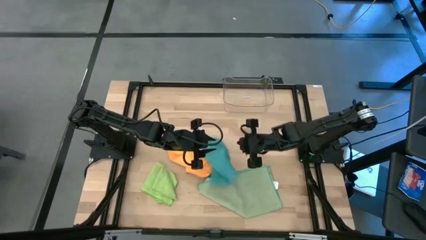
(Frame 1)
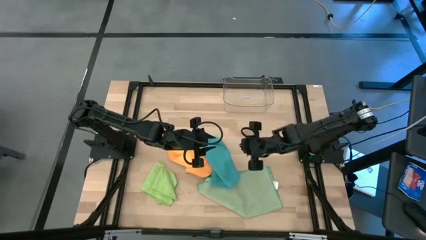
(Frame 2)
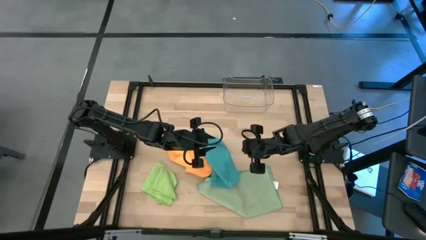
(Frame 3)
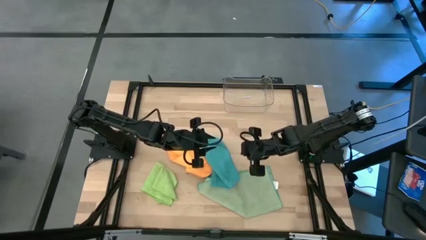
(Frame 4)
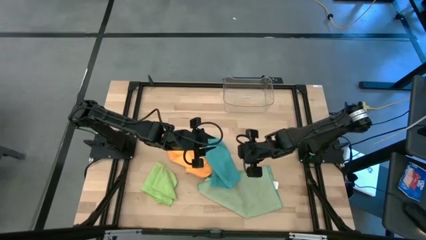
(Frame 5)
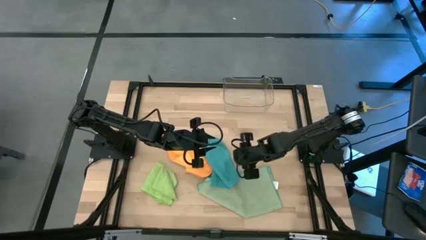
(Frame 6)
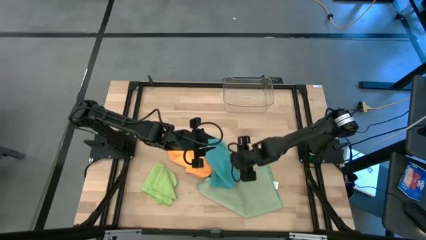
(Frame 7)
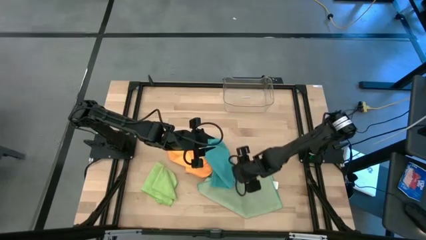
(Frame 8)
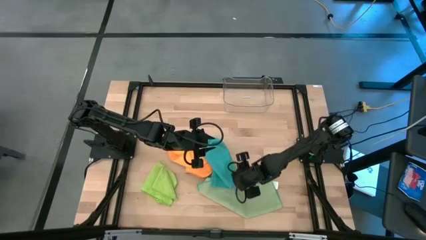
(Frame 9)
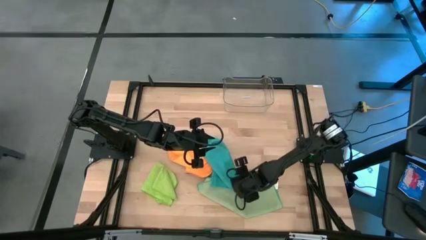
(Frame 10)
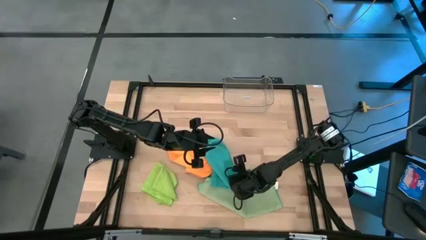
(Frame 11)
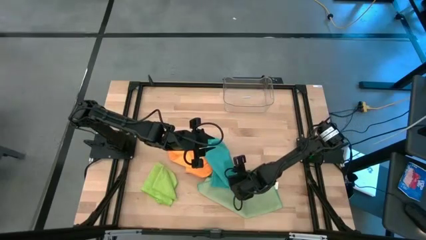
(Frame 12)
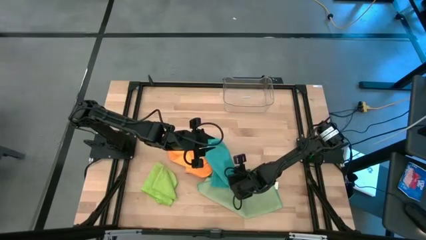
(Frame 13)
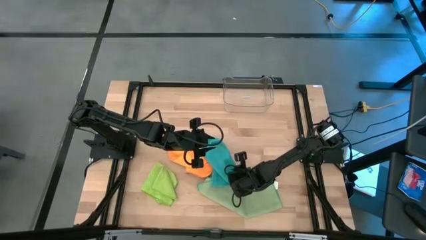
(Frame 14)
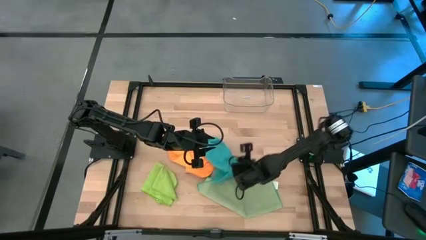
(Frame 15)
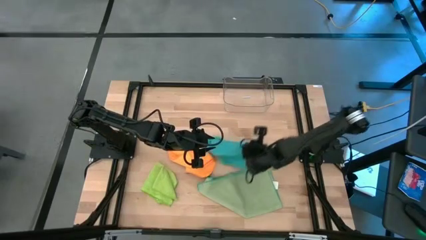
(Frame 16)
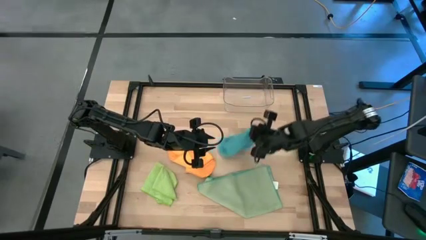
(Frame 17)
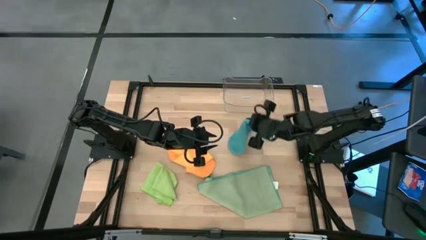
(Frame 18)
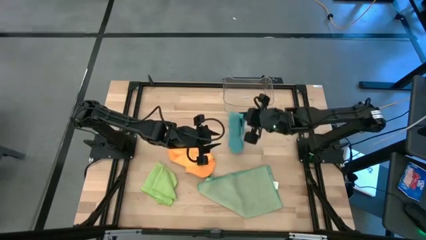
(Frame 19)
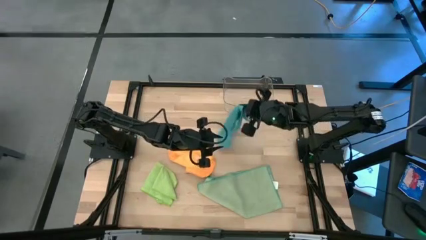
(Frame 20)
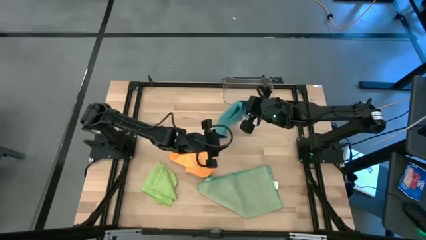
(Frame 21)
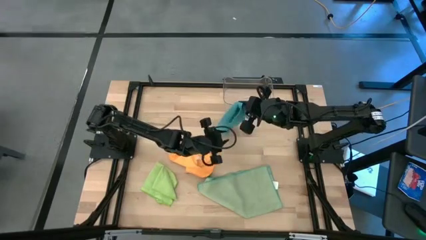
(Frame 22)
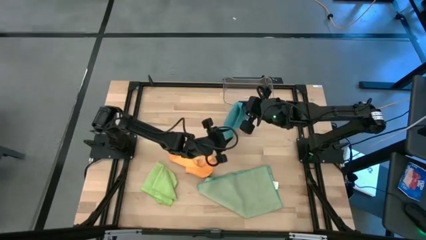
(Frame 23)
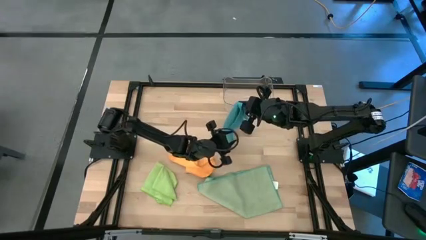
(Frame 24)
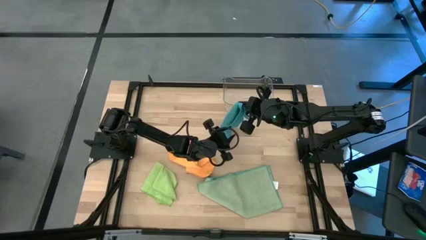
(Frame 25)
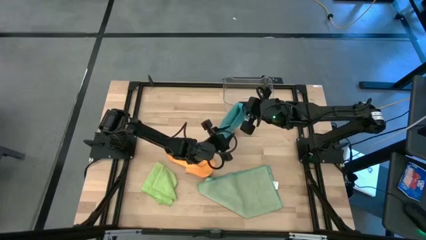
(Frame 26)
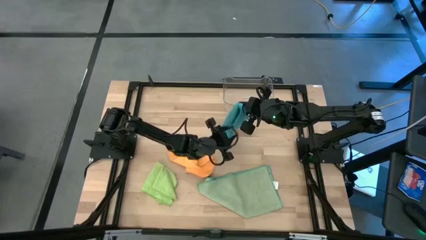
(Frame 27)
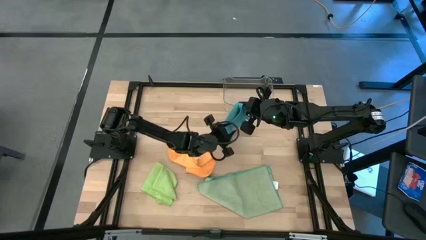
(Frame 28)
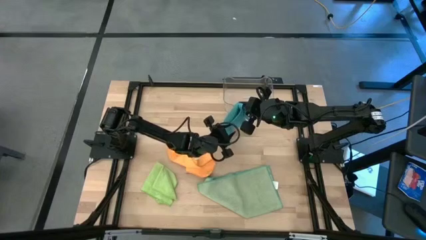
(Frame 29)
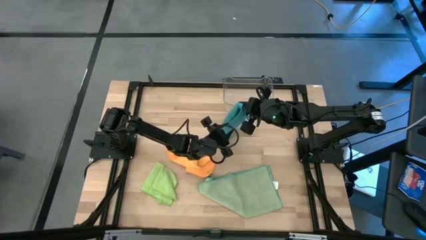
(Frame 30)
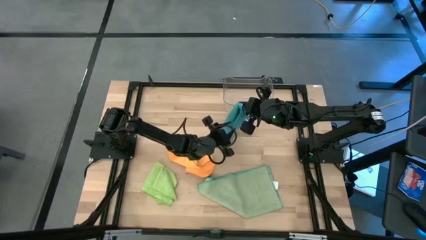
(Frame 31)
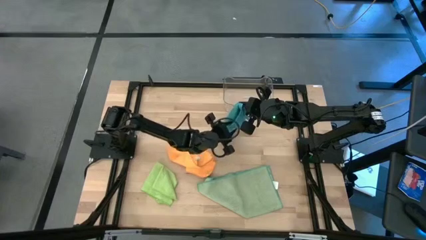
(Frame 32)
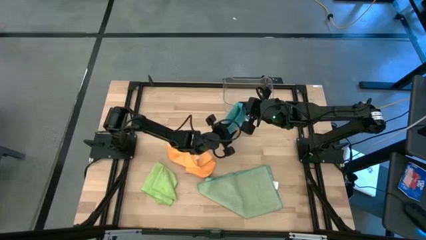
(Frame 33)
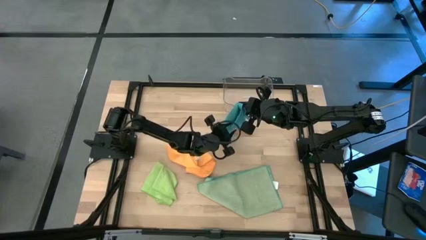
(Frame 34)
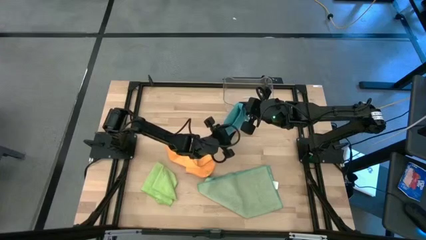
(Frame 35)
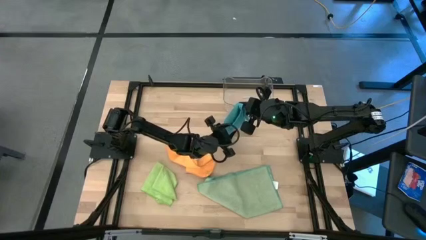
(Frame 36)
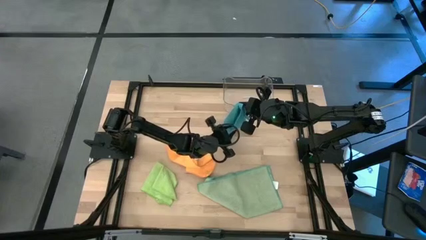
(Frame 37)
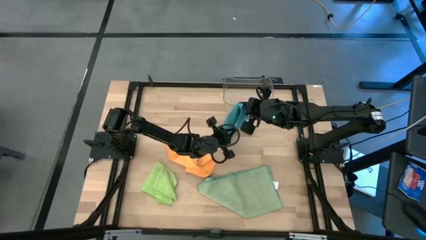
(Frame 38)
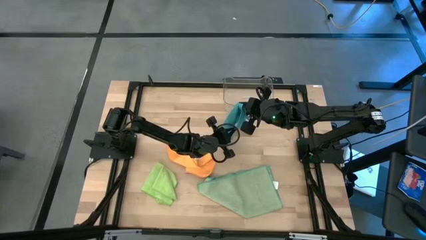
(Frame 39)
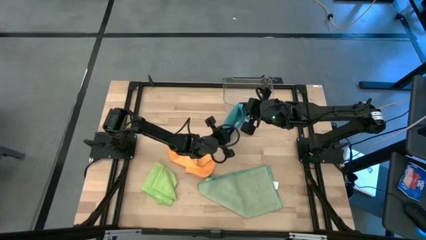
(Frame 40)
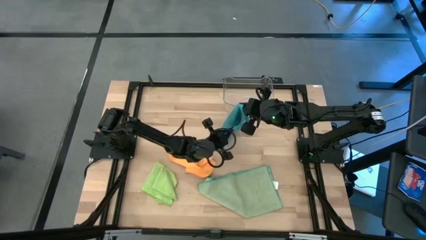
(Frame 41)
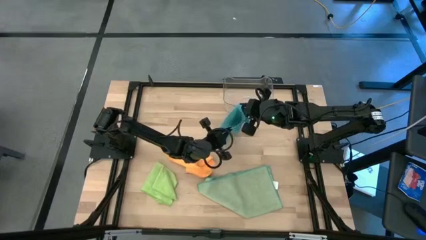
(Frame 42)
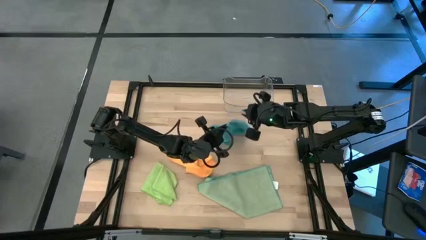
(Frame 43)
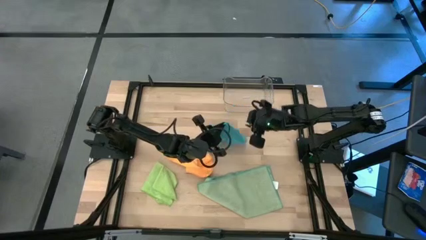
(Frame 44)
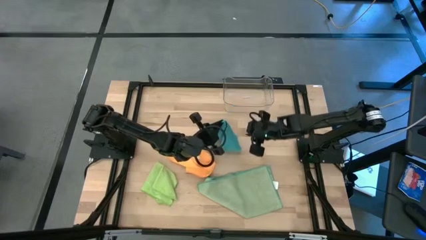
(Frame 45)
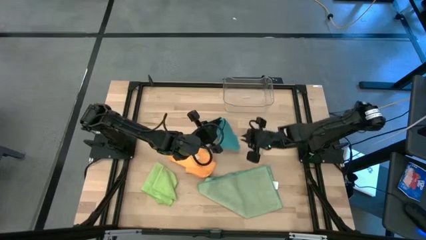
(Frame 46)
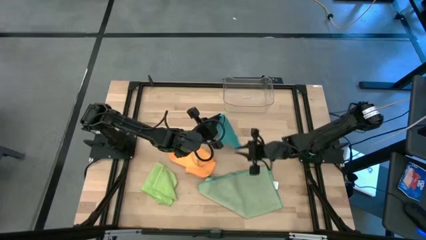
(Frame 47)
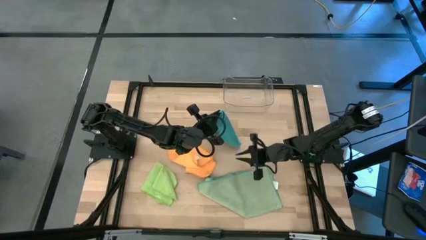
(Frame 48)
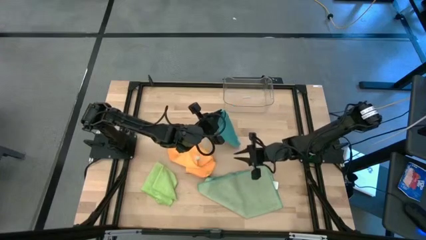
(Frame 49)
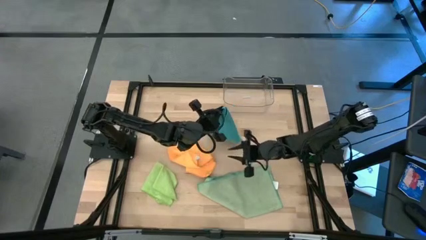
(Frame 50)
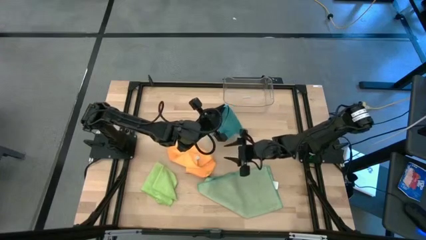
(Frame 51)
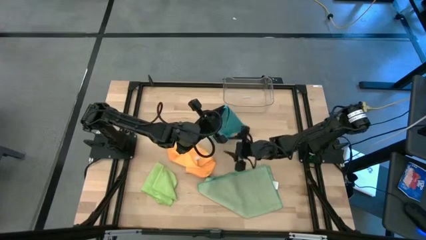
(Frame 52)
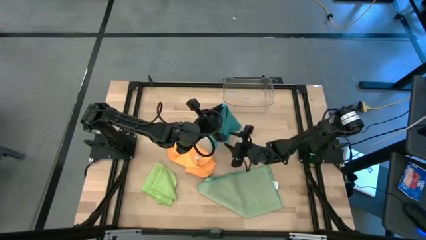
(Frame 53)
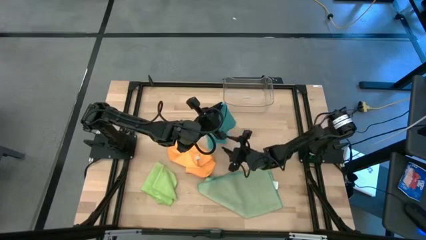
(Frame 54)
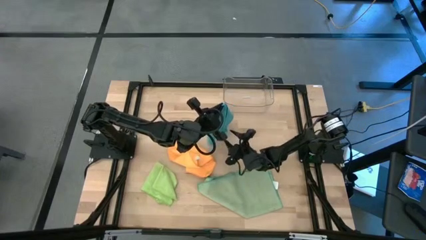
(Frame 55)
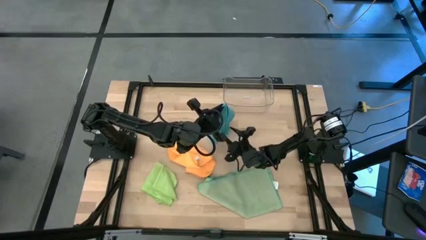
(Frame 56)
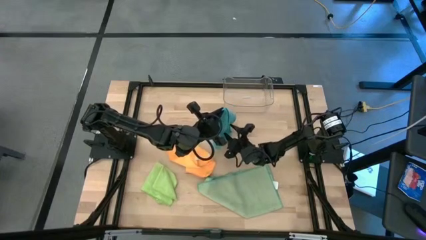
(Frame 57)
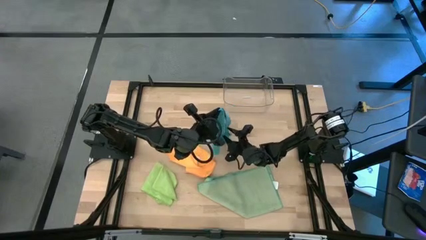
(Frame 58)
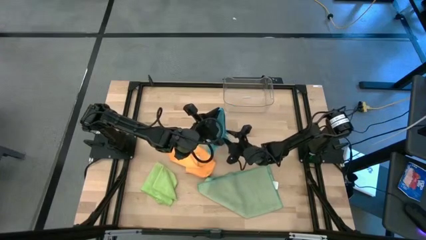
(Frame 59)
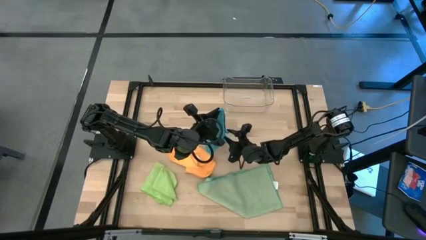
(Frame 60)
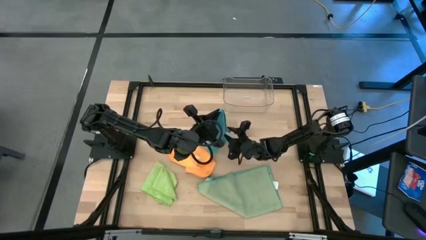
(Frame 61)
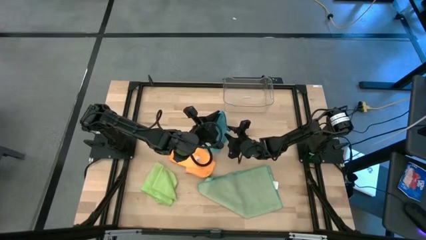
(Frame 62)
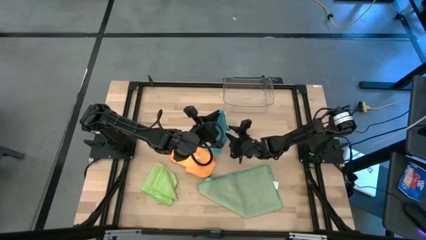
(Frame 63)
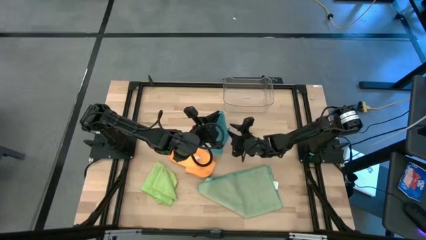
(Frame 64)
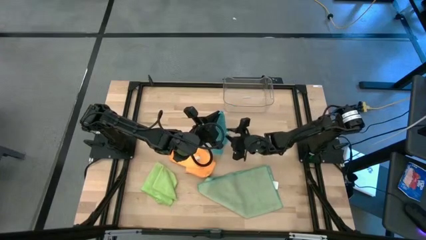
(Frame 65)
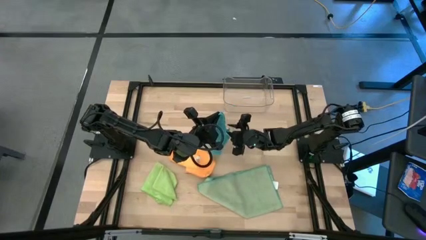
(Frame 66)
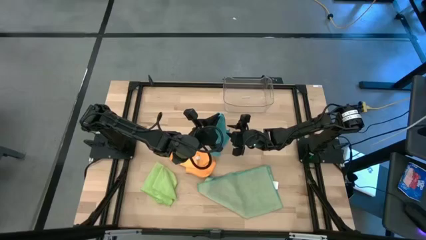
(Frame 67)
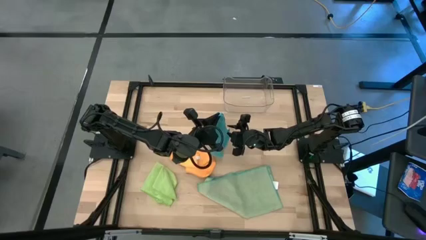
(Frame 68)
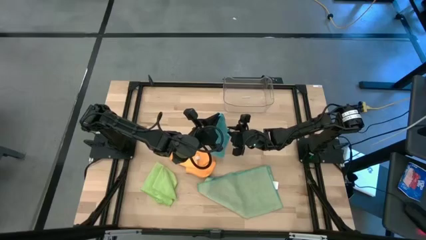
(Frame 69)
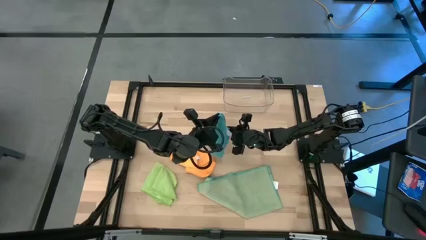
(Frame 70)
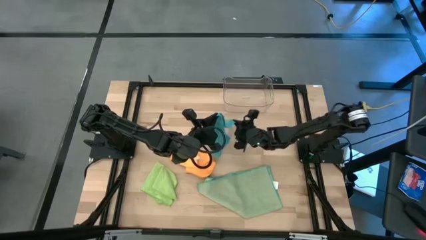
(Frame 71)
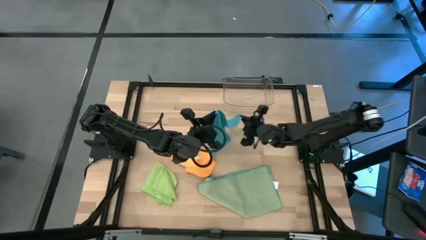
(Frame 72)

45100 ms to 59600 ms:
Task: Fold microfiber towels
Fold the blue microfiber cloth
